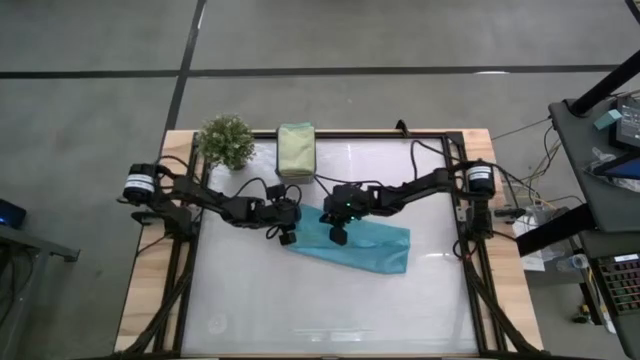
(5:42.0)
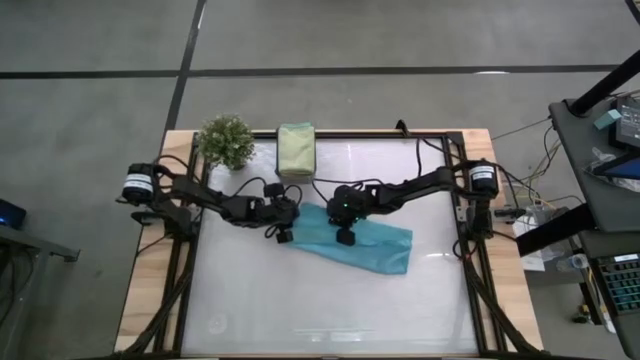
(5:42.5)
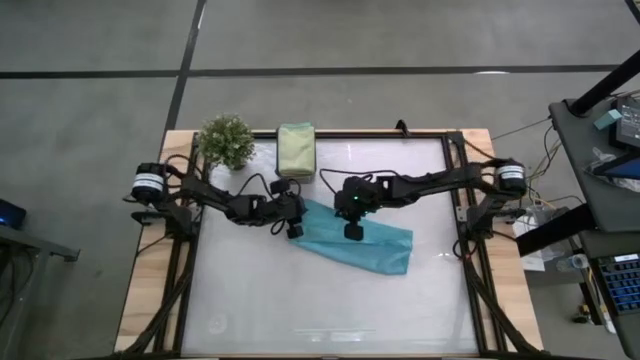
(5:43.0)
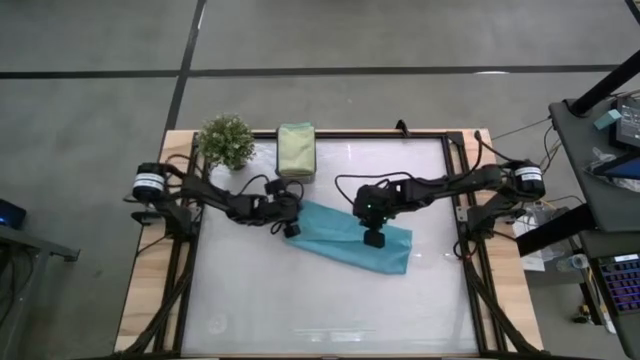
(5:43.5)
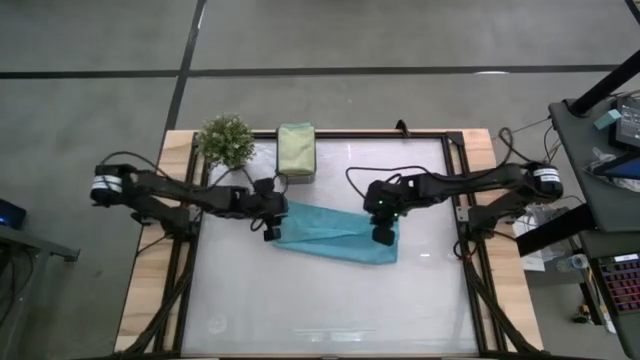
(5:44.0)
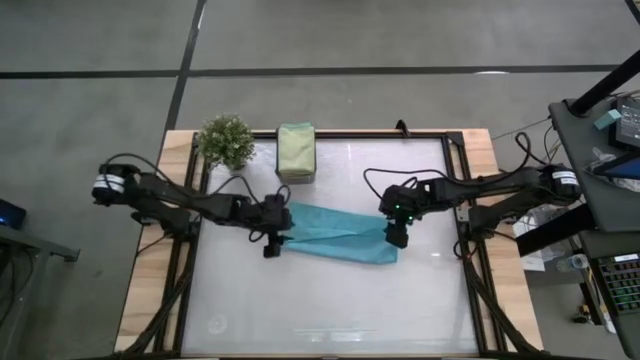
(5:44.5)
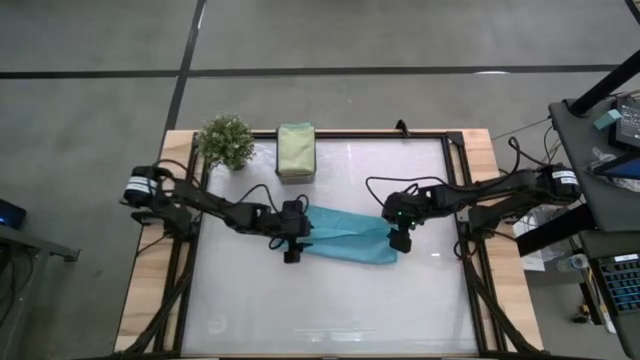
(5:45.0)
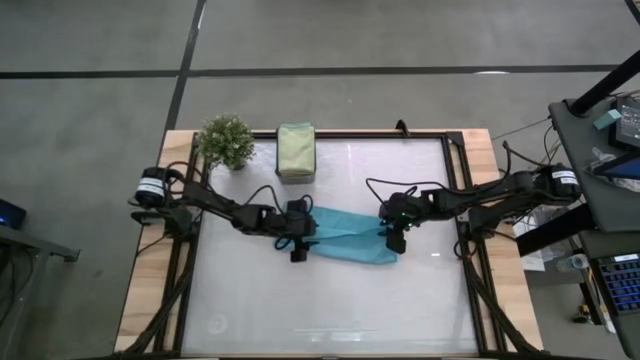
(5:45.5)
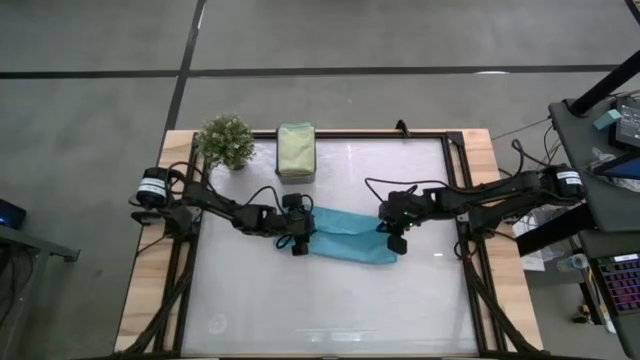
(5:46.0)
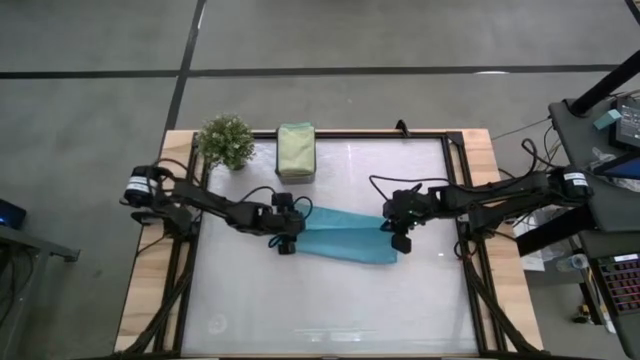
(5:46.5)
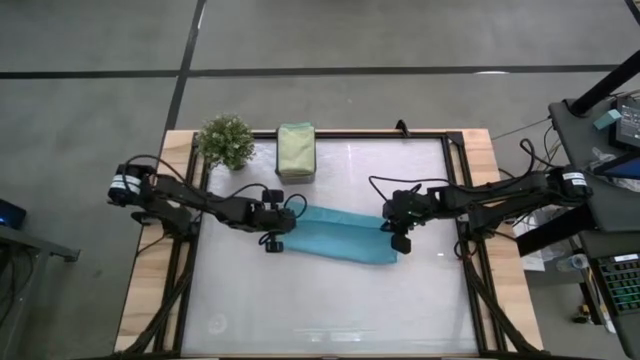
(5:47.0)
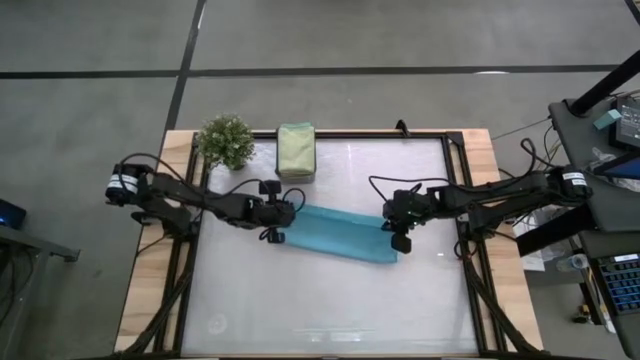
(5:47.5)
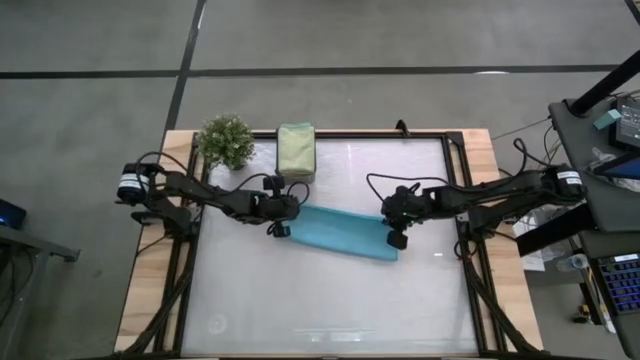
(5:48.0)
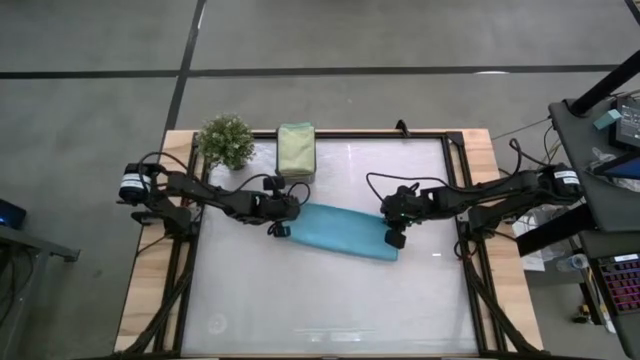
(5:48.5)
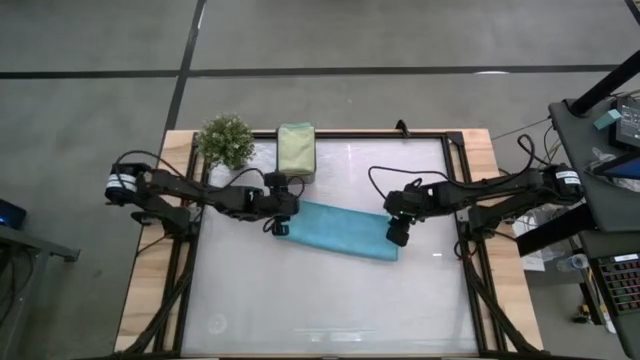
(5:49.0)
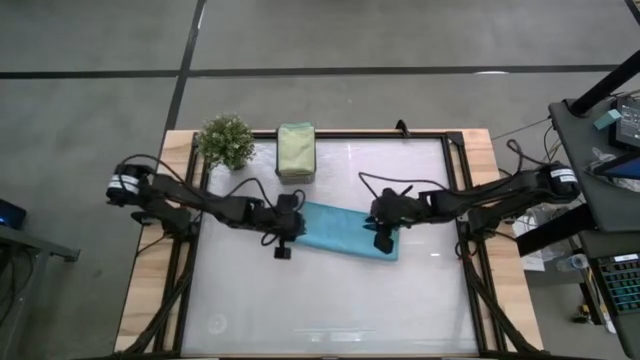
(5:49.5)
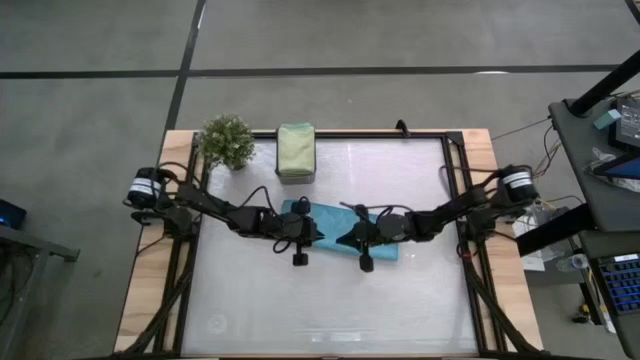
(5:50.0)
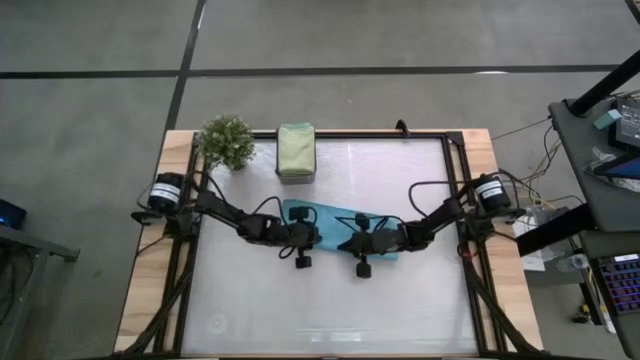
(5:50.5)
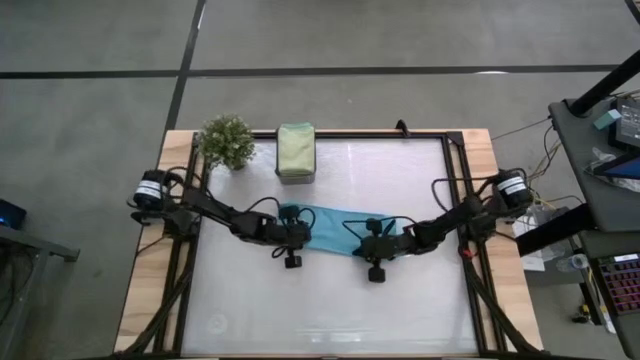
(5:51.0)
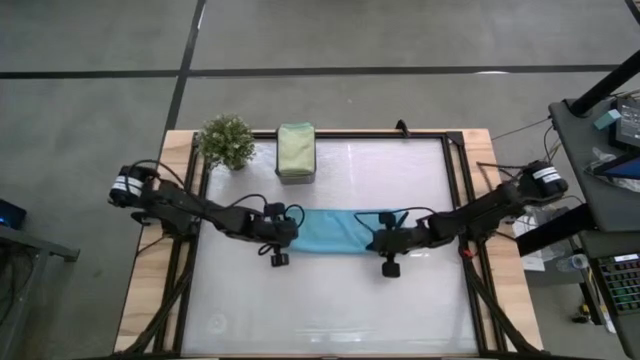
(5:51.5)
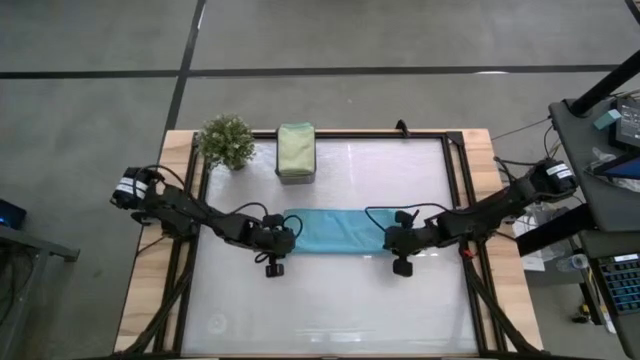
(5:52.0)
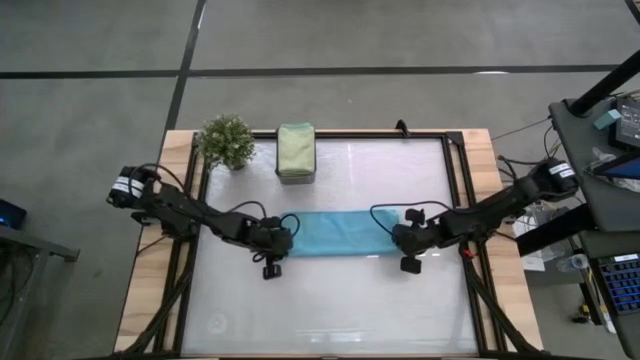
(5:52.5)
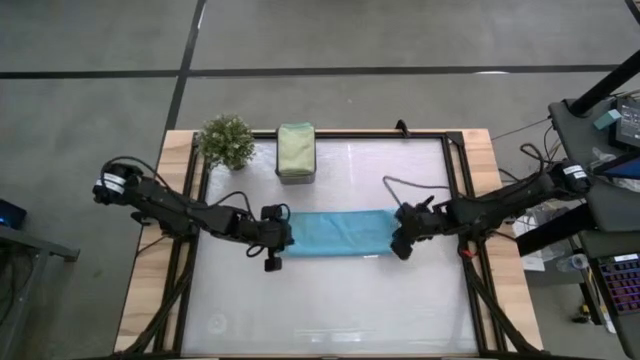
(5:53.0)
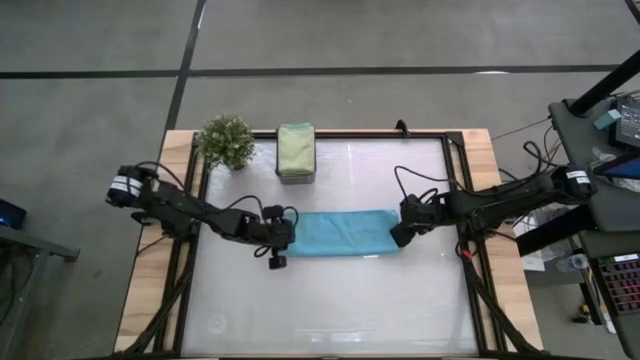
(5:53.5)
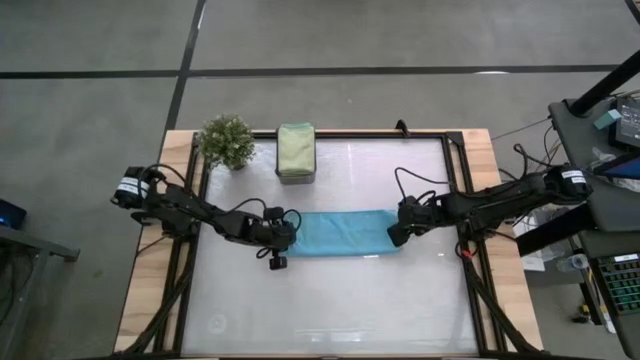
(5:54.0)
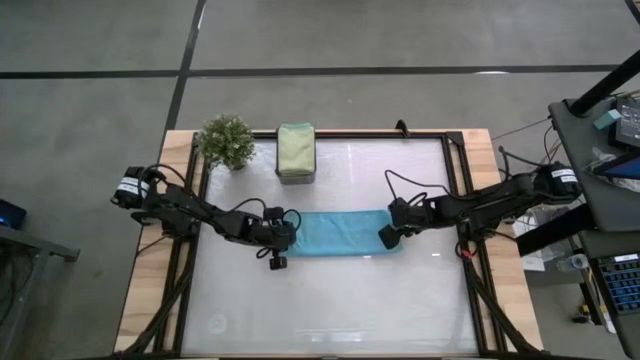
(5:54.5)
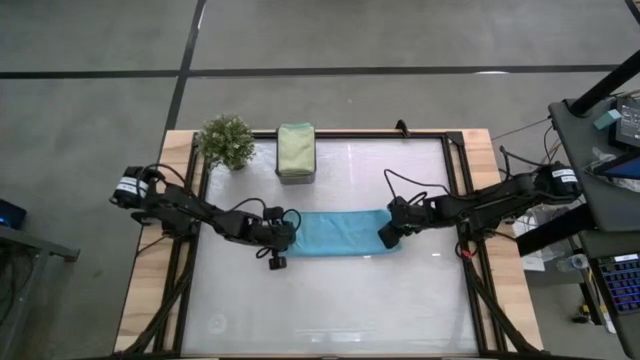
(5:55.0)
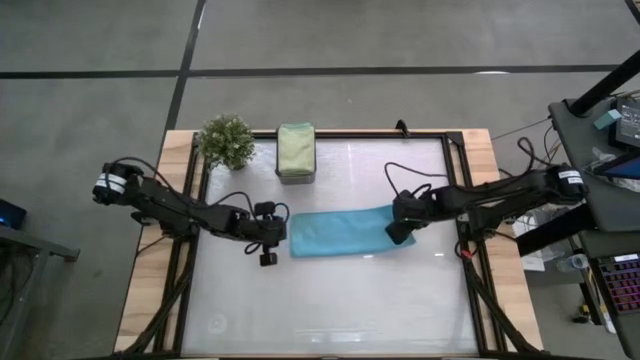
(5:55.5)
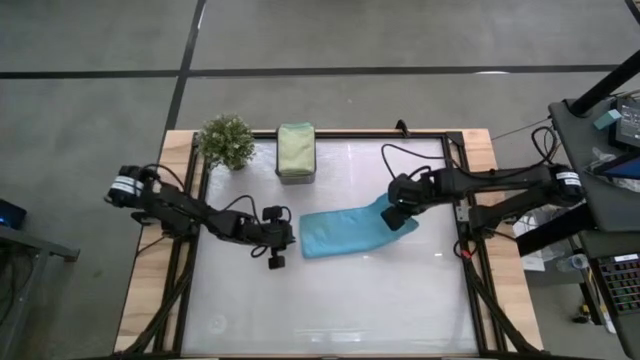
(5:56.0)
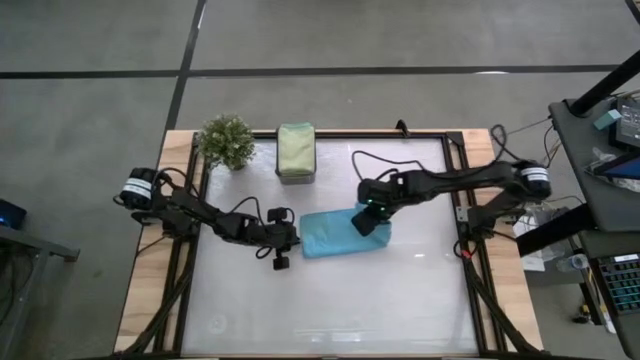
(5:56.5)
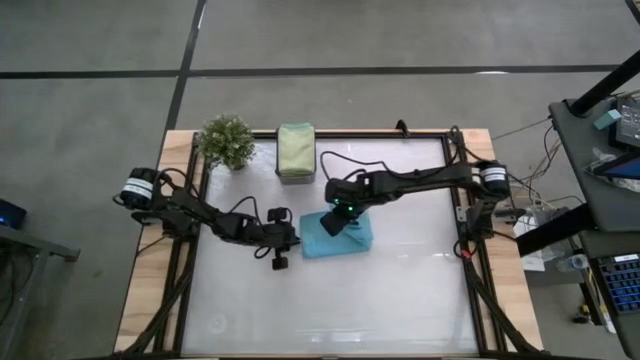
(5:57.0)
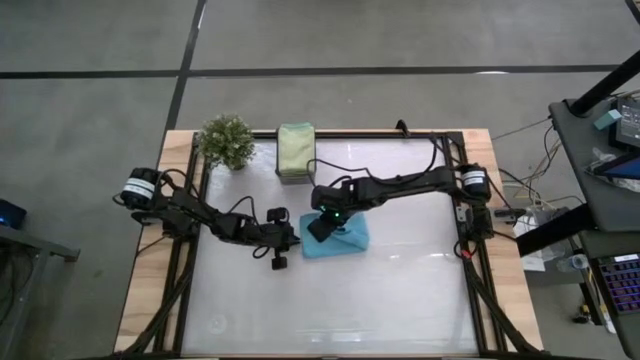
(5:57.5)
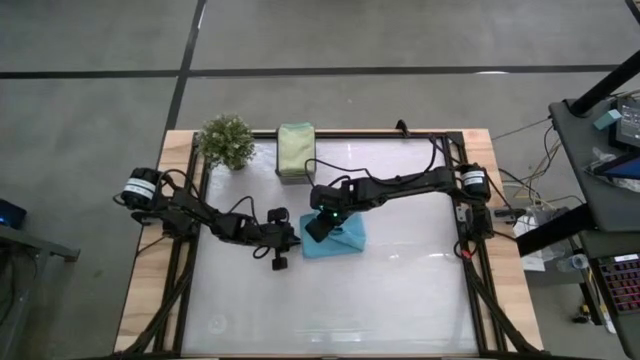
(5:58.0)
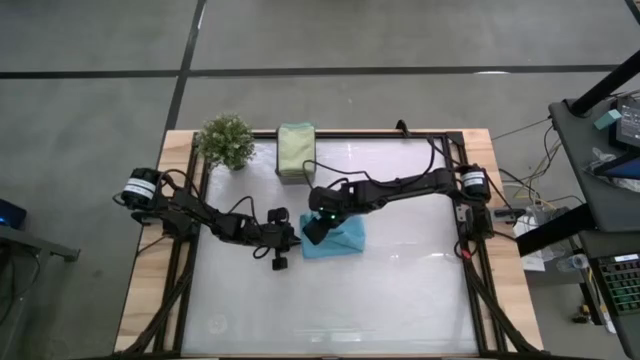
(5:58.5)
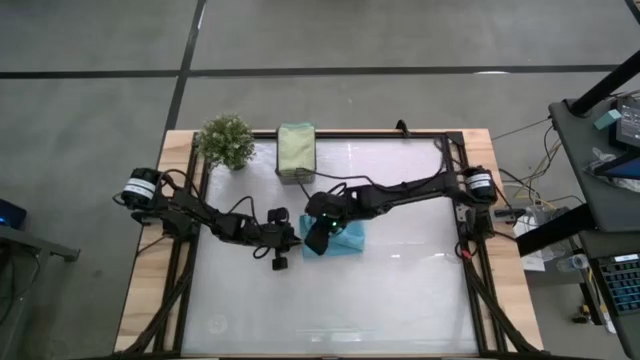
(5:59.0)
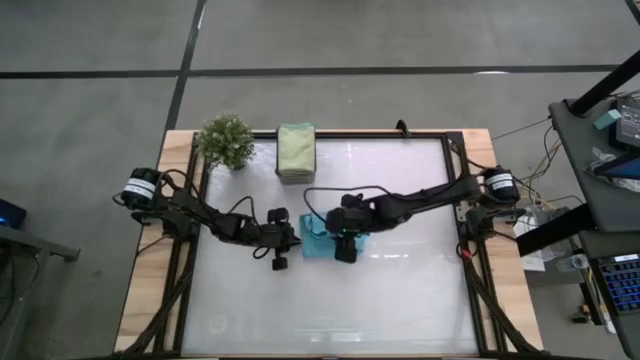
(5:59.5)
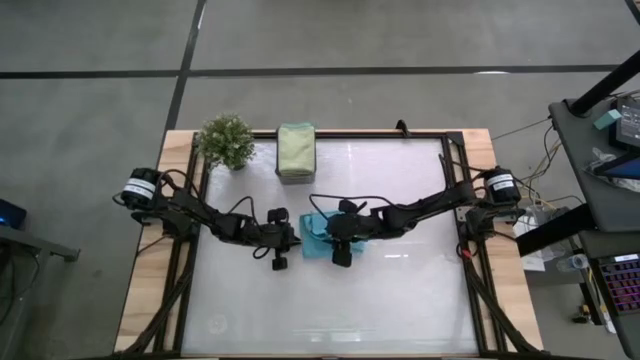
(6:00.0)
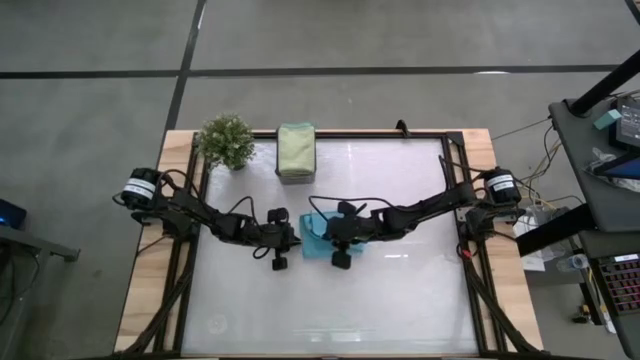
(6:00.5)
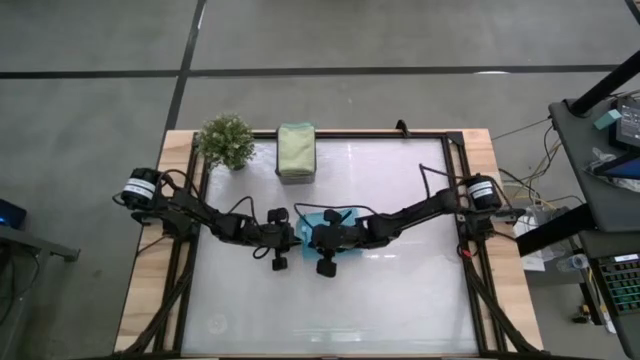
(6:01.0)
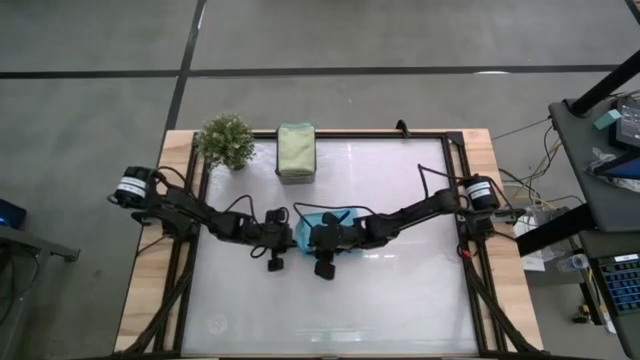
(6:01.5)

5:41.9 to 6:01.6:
Task: Fold microfiber towels
Fold the blue towel
